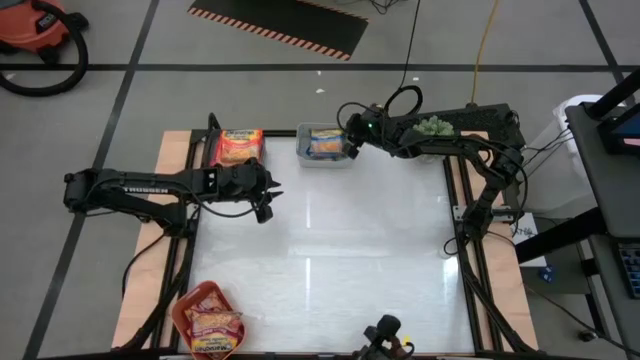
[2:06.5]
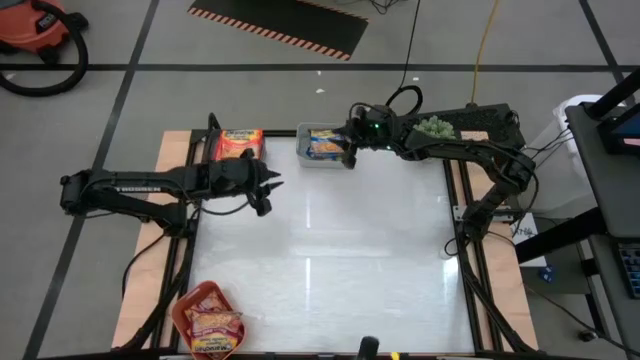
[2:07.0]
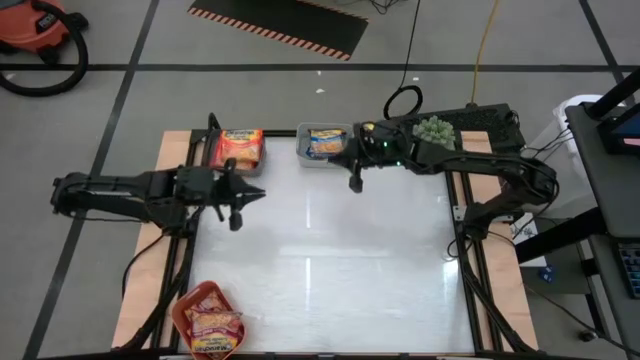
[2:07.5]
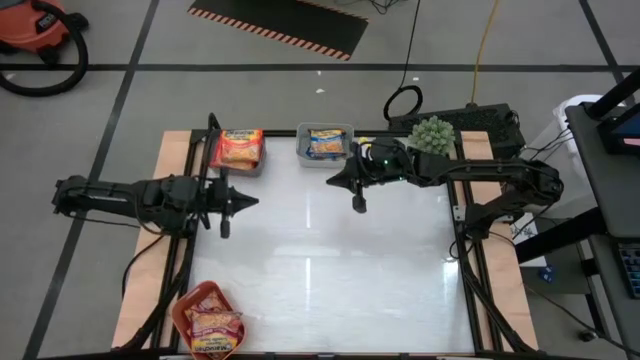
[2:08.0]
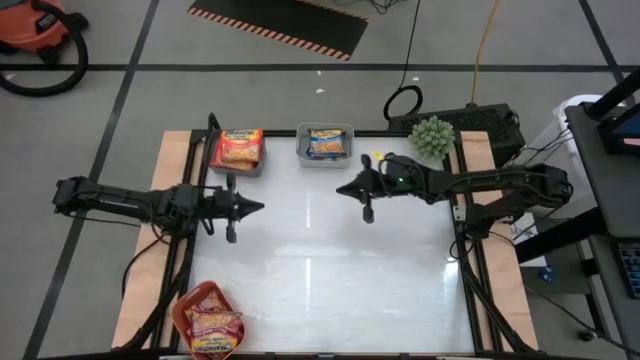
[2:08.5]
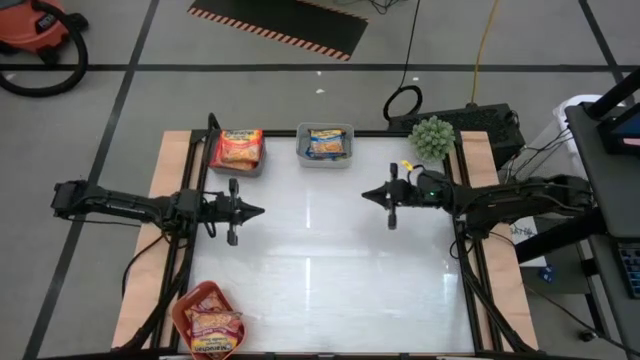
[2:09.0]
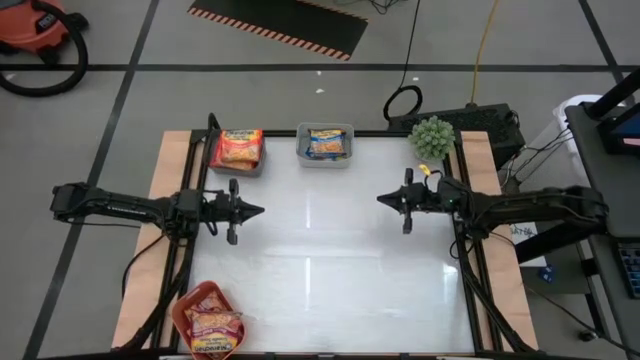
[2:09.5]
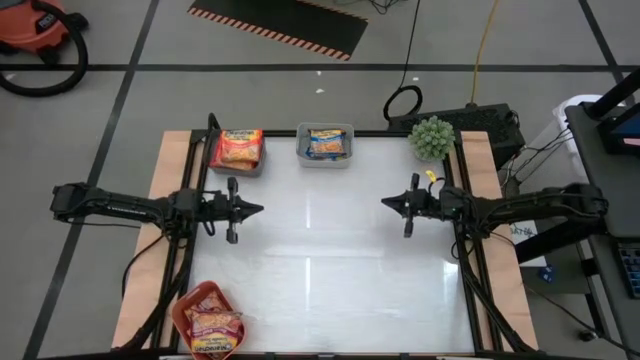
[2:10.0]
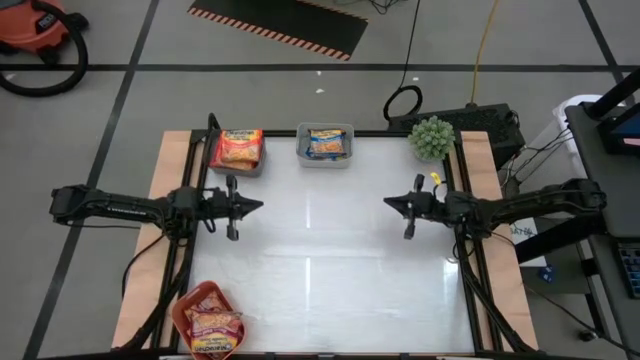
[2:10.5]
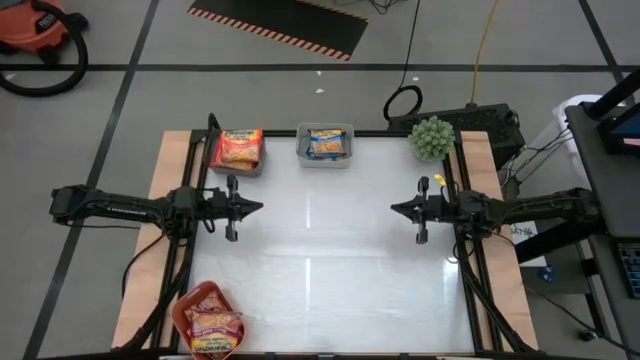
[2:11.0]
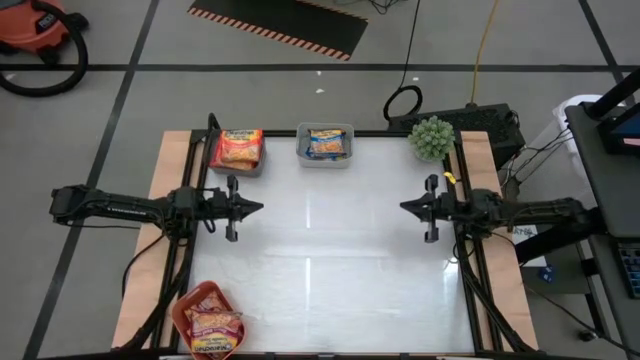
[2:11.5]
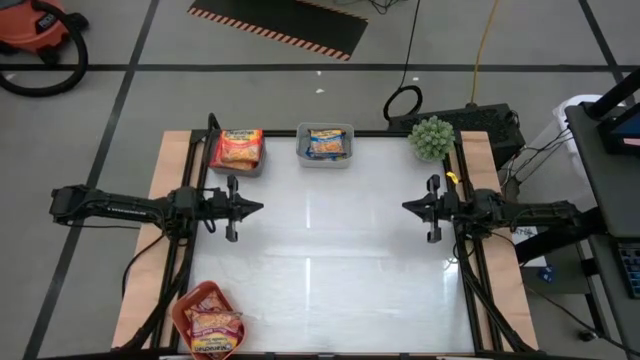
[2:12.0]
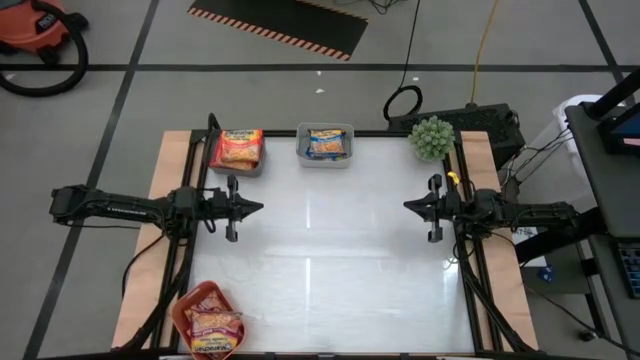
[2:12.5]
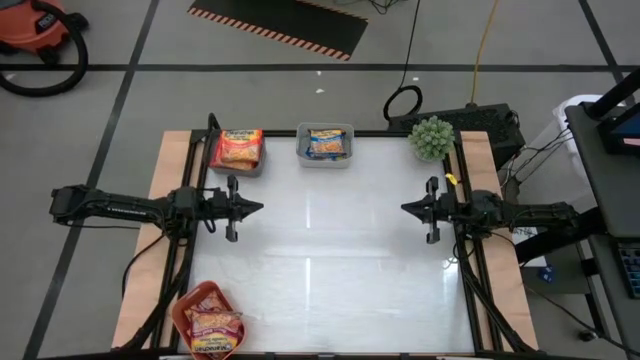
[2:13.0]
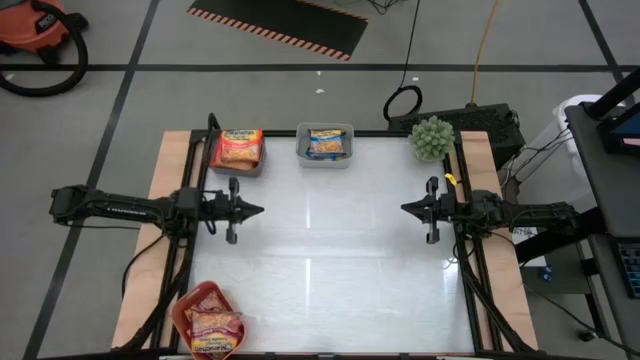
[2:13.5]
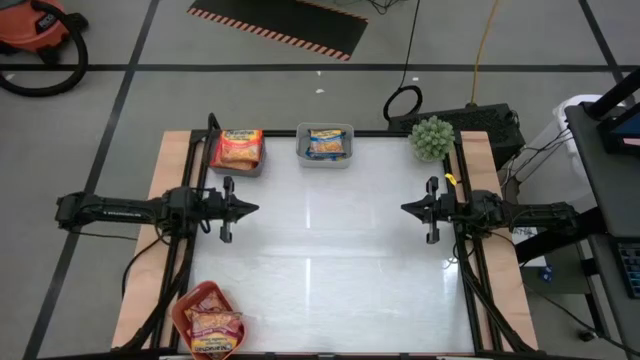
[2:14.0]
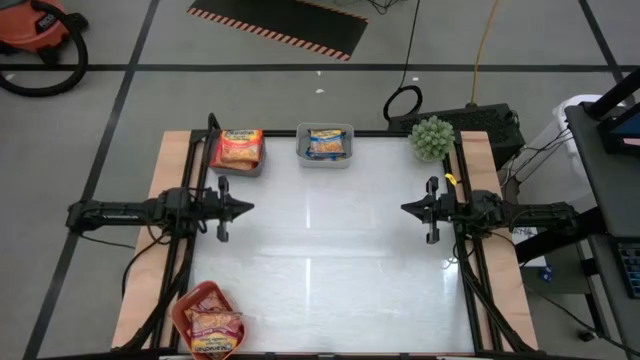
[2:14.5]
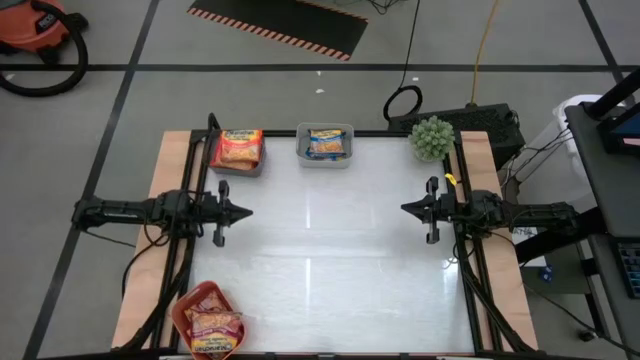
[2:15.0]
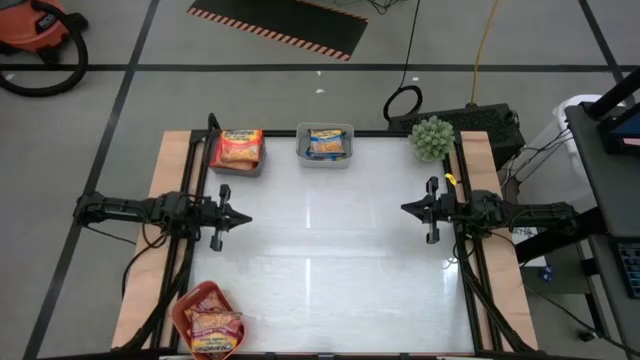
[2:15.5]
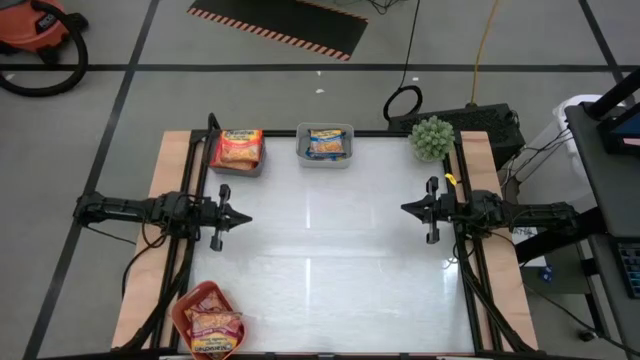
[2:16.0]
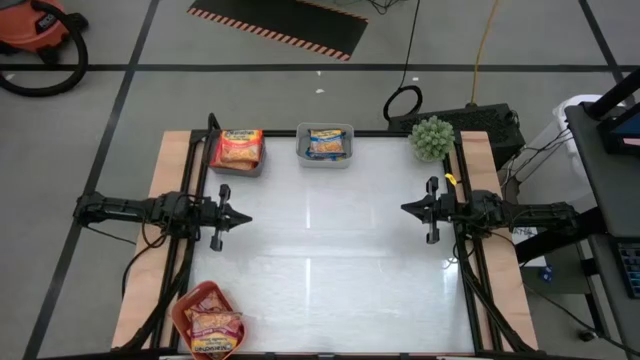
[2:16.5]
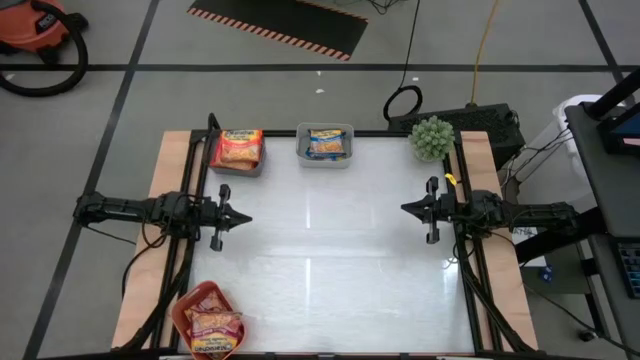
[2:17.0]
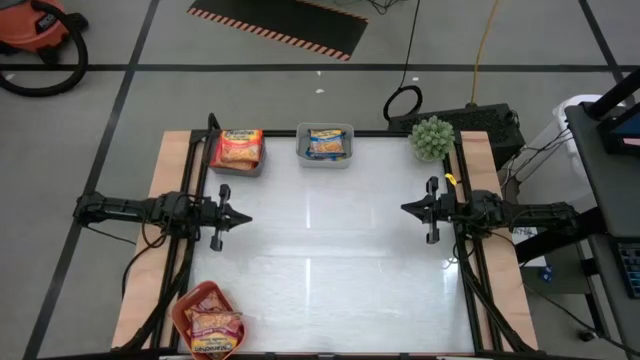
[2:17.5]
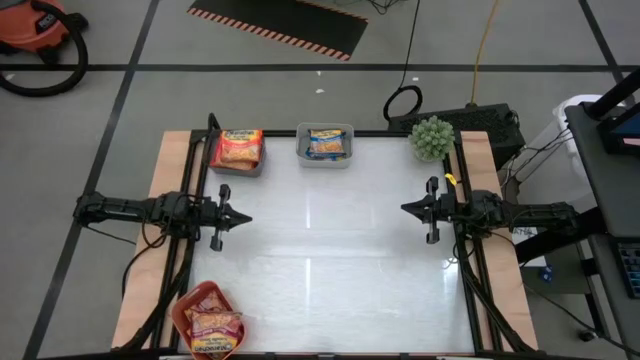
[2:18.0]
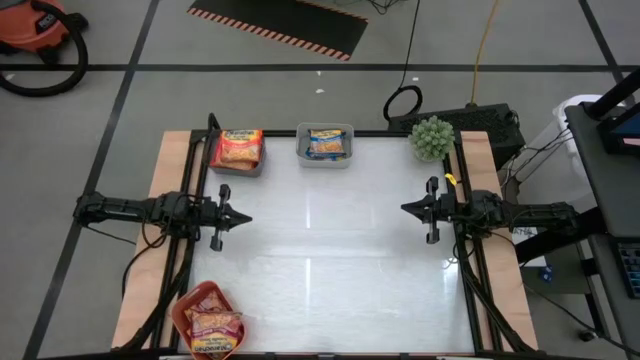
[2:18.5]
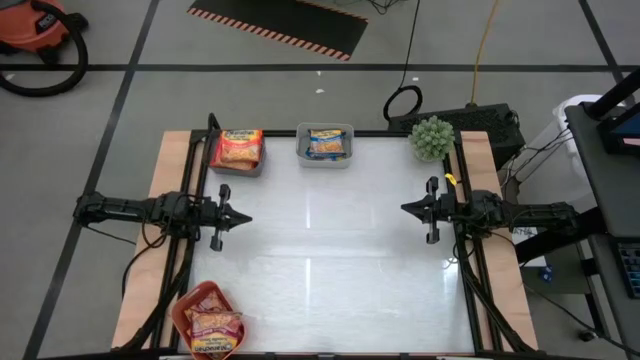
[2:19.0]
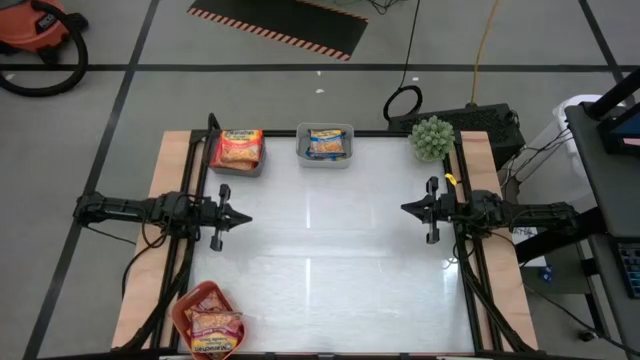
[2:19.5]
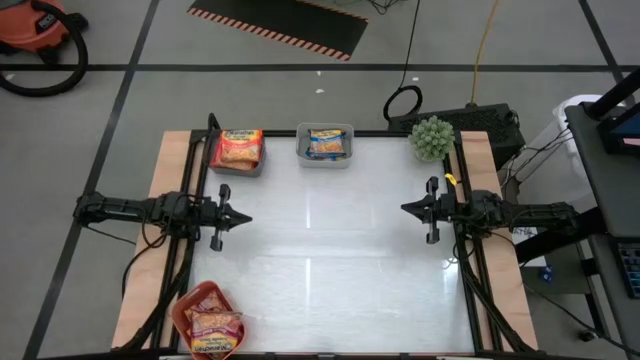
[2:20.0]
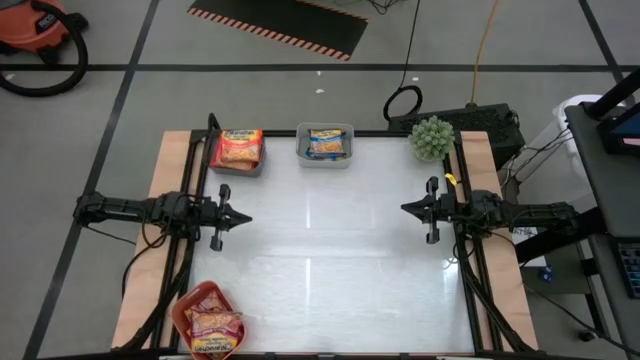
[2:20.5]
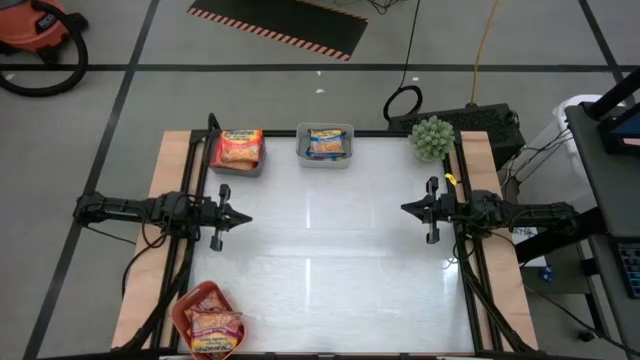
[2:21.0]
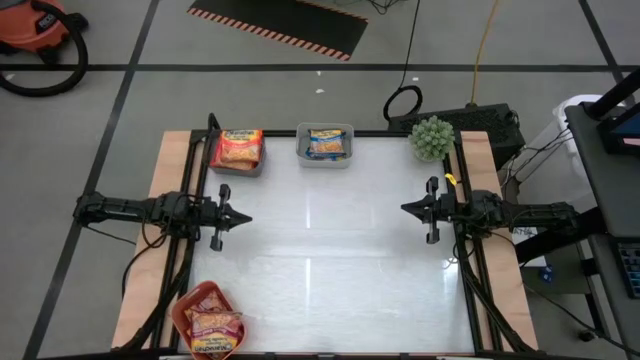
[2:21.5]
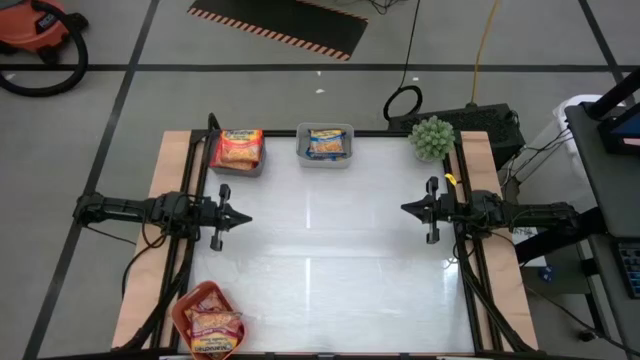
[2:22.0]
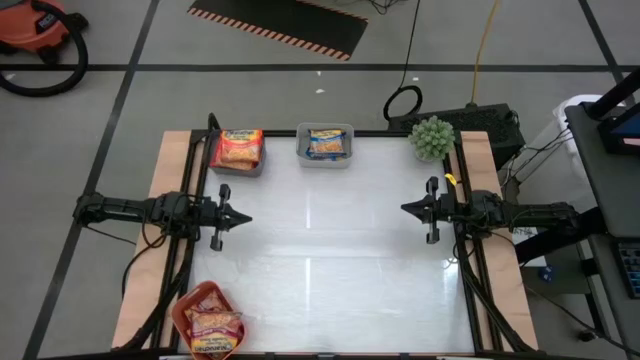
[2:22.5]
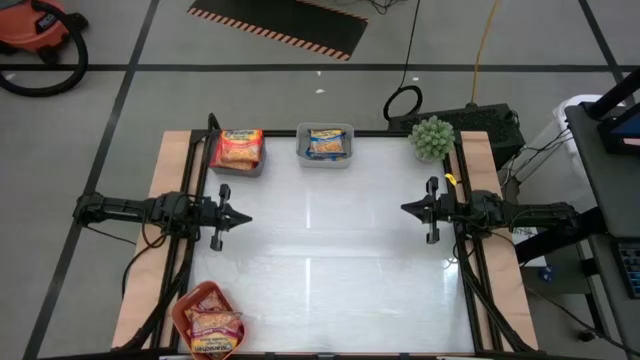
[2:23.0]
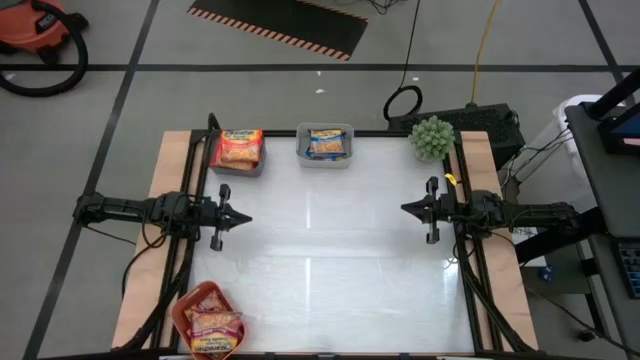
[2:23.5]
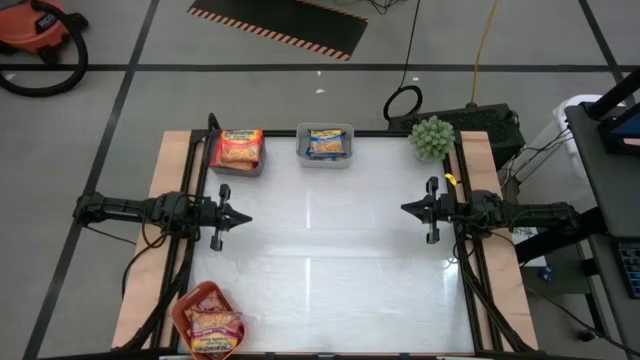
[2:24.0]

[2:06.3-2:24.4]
Task: Sort Maruchan noodles
Return to Home Position

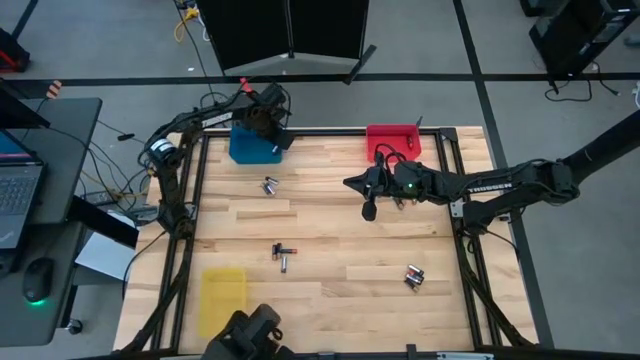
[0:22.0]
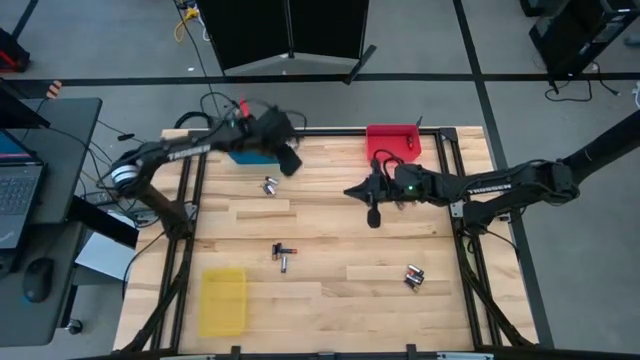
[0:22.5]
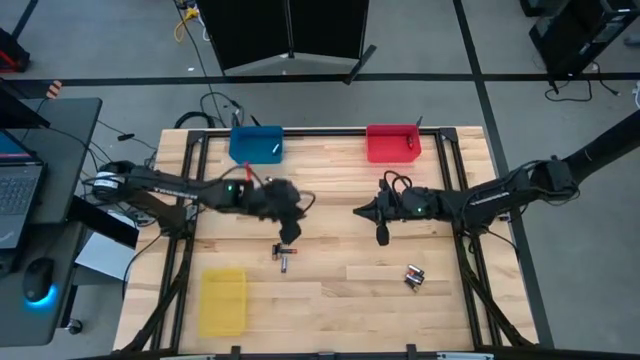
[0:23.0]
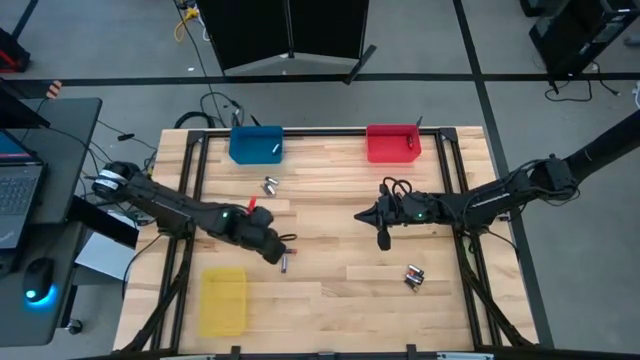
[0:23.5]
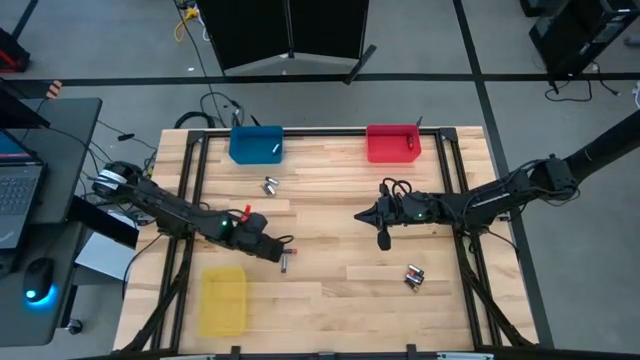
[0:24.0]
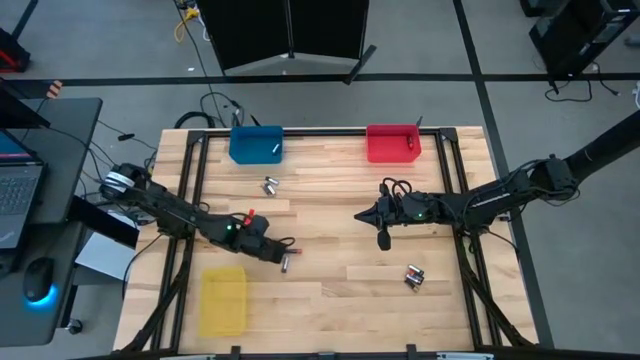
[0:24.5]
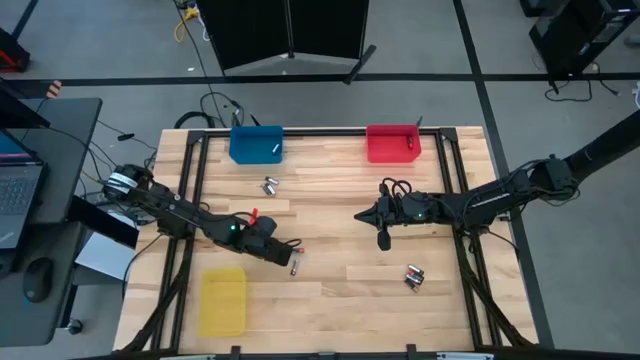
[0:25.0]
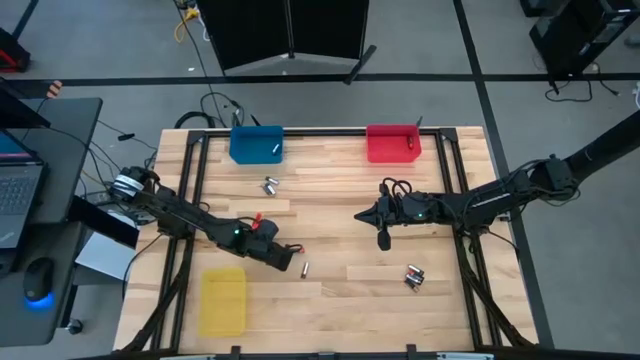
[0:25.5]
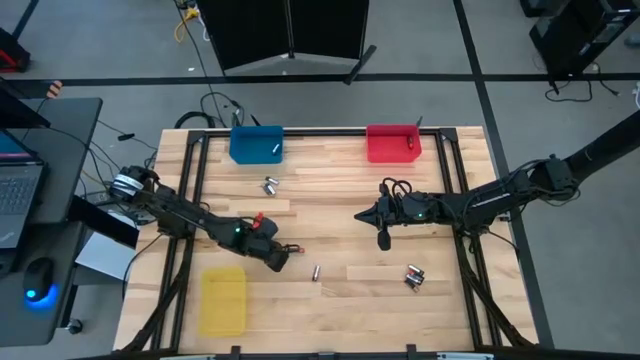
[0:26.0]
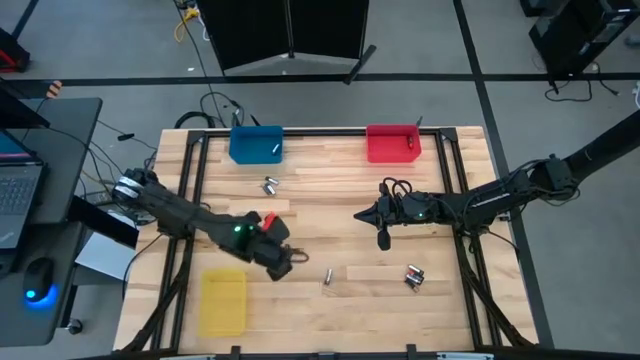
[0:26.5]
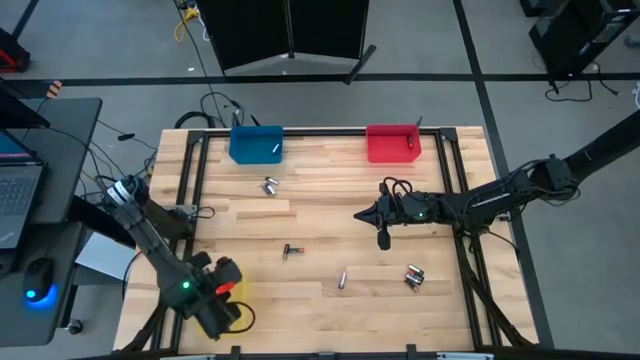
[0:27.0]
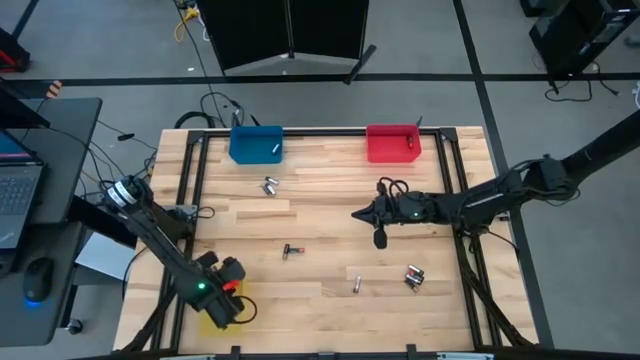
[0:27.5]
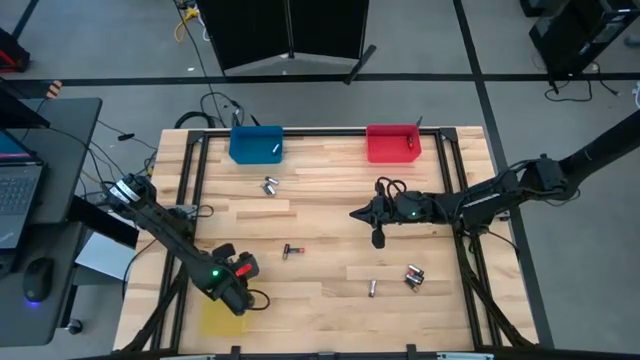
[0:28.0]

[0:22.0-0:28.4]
Task: Sort batteries
Put the black-brown battery into the yellow bin
